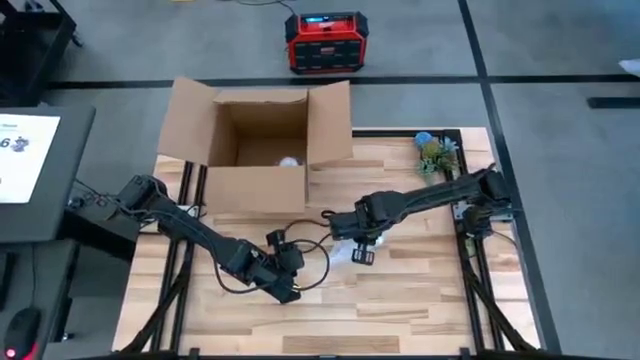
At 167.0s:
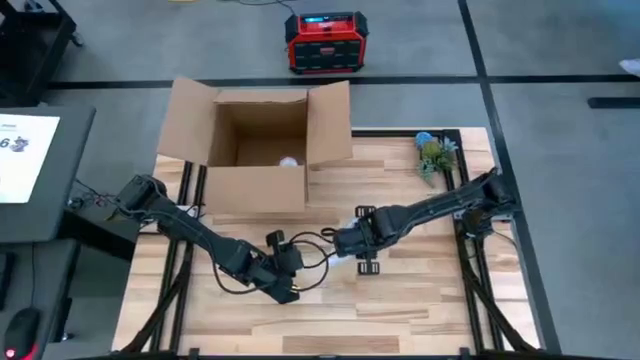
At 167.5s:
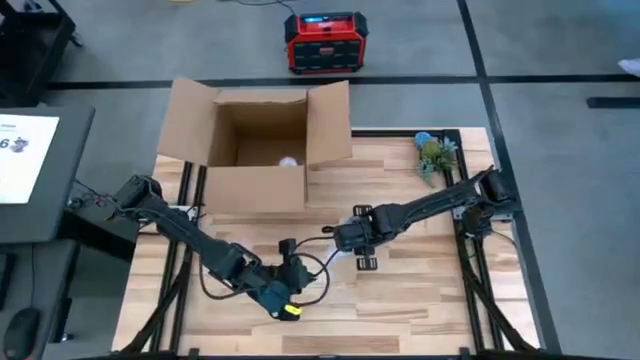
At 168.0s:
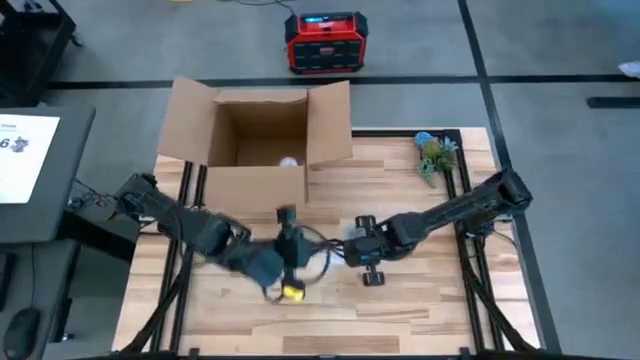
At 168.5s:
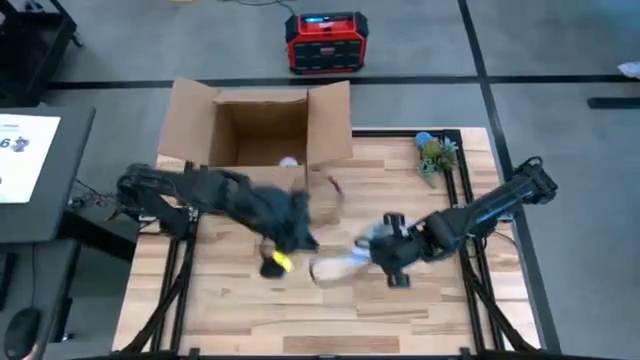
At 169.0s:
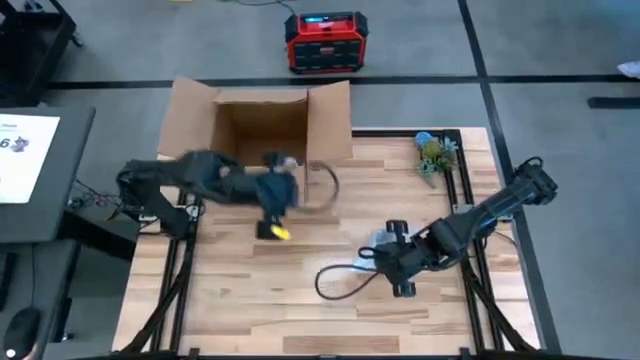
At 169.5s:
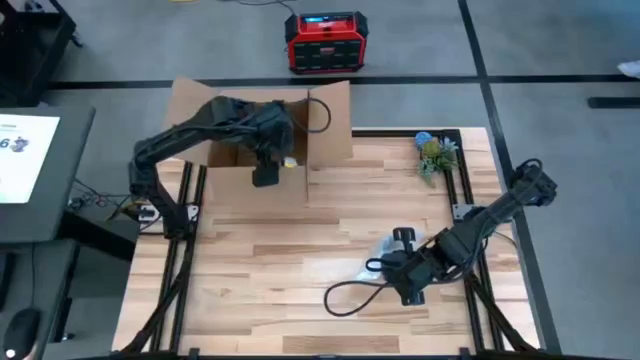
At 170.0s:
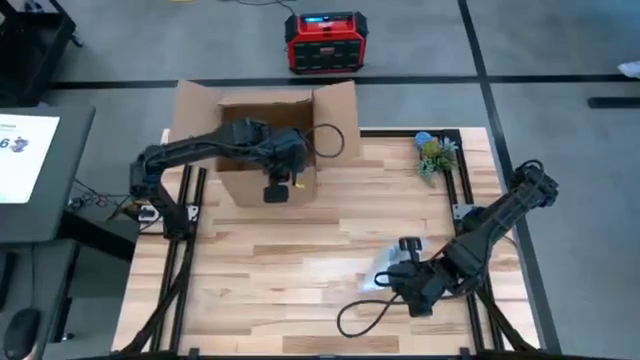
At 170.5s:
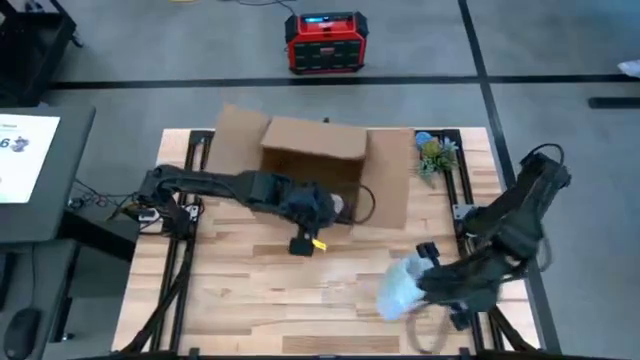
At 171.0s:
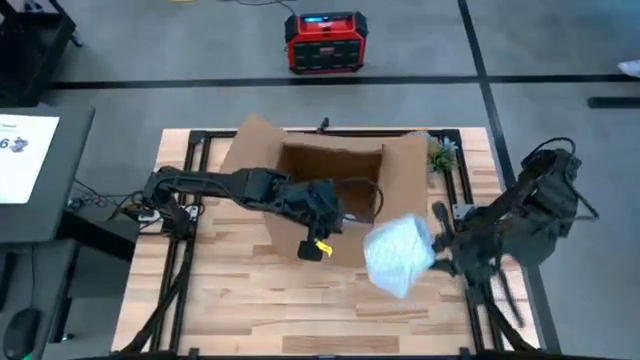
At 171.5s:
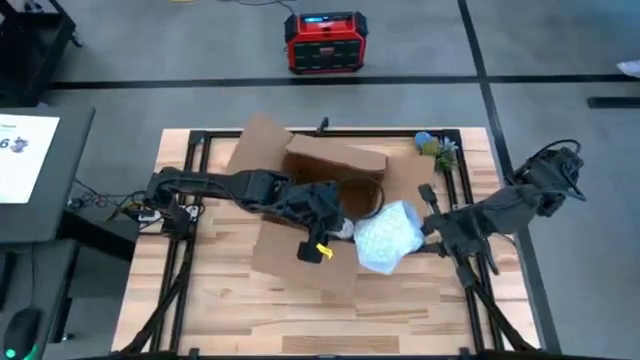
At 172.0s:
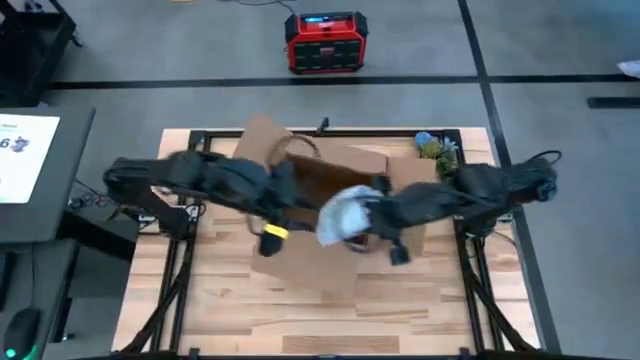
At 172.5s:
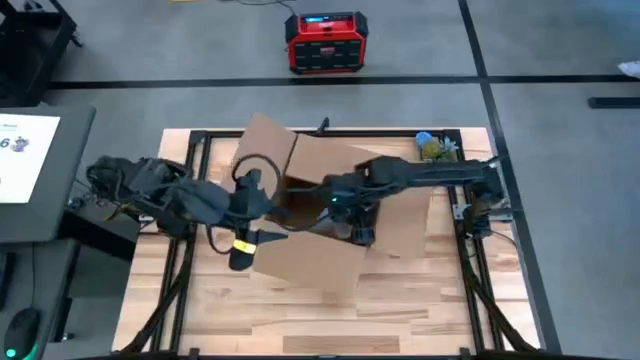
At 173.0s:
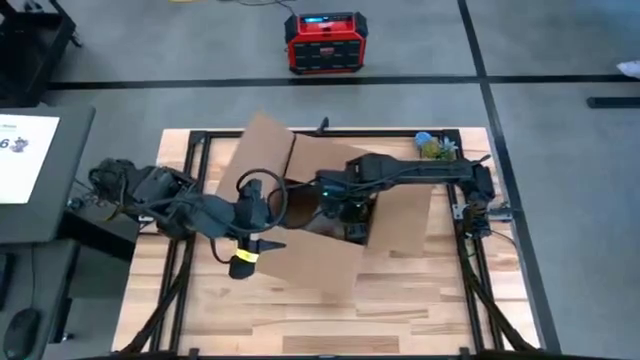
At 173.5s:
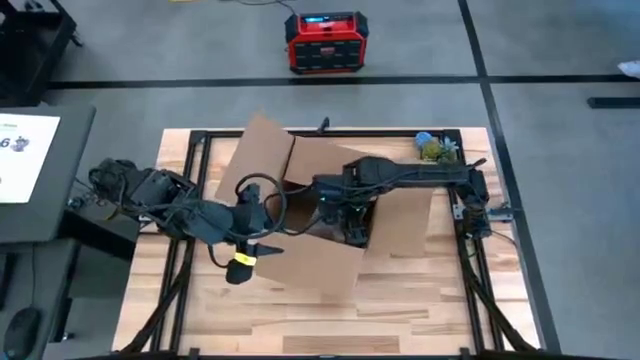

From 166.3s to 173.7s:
Task: wrap mug
Put the wrapped green mug into the cardboard box

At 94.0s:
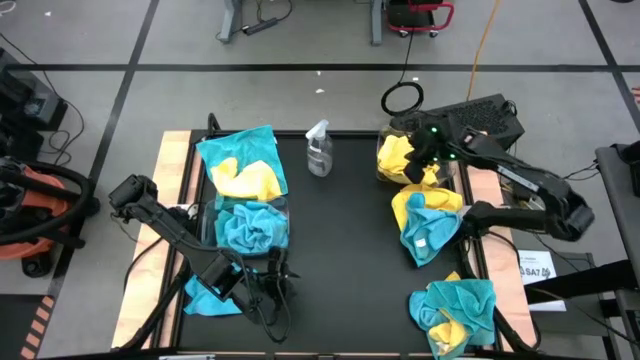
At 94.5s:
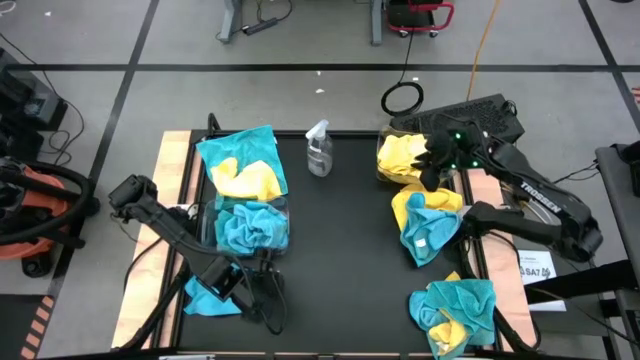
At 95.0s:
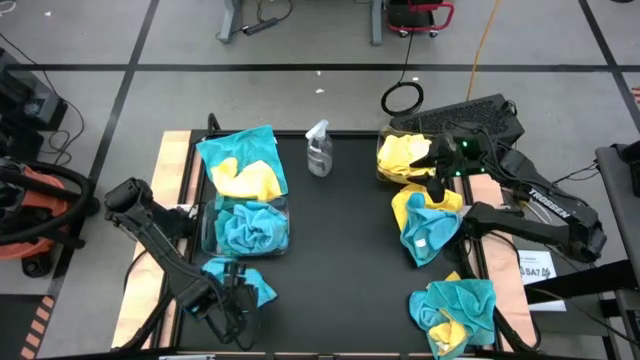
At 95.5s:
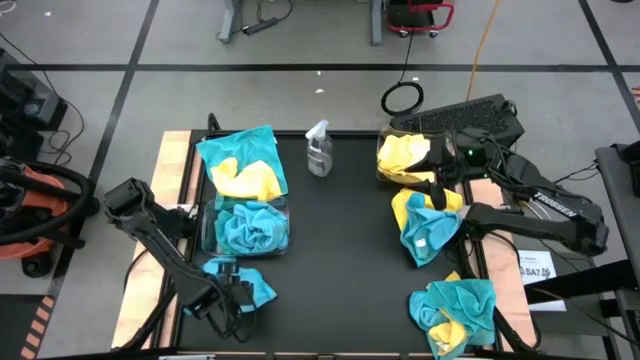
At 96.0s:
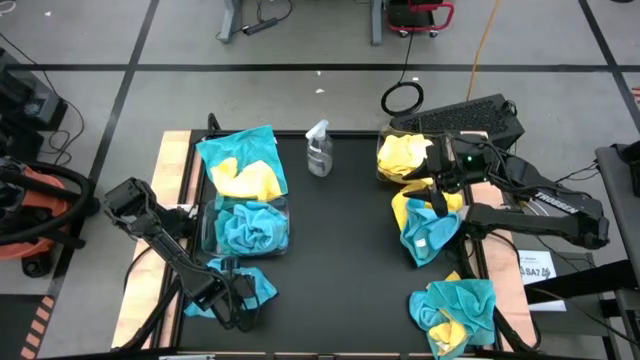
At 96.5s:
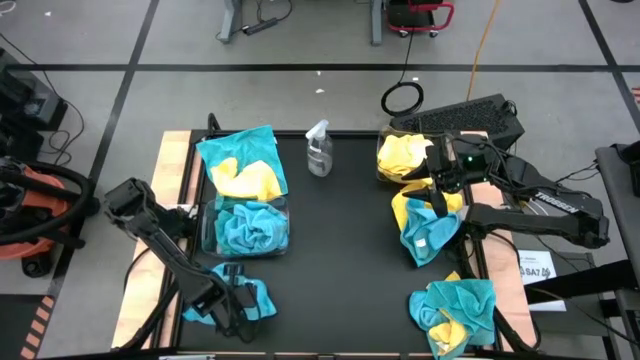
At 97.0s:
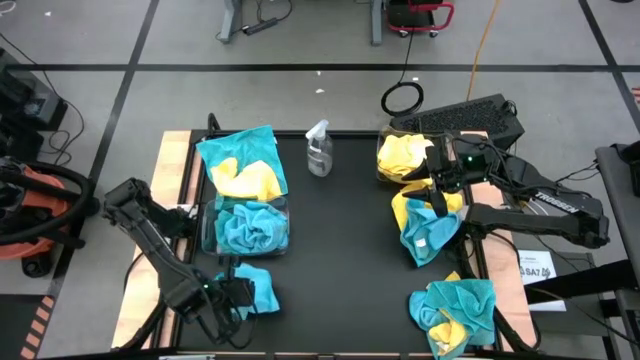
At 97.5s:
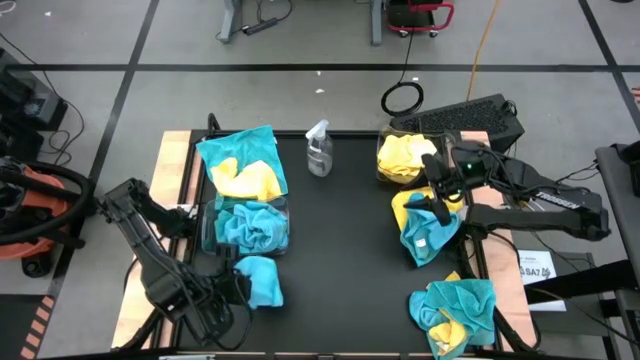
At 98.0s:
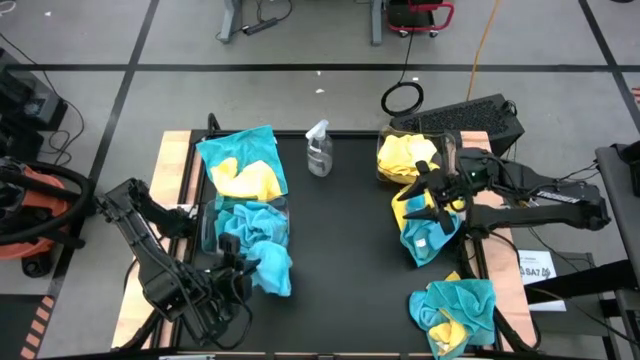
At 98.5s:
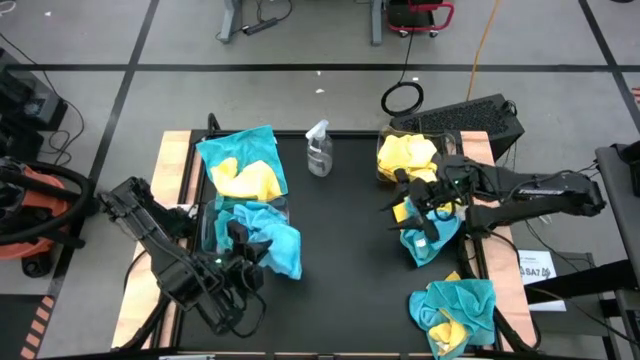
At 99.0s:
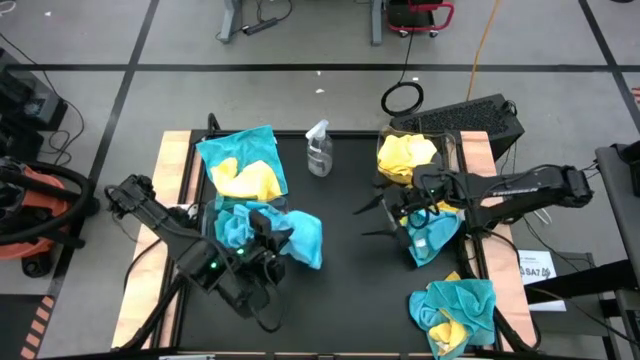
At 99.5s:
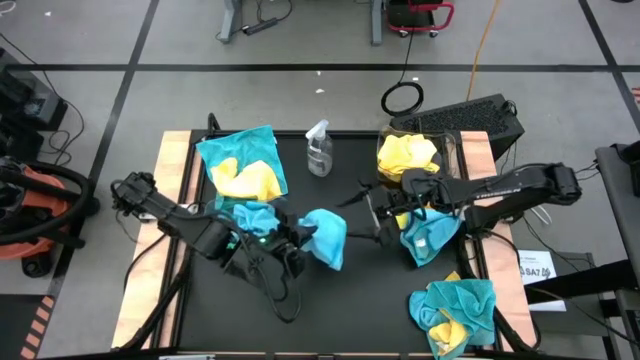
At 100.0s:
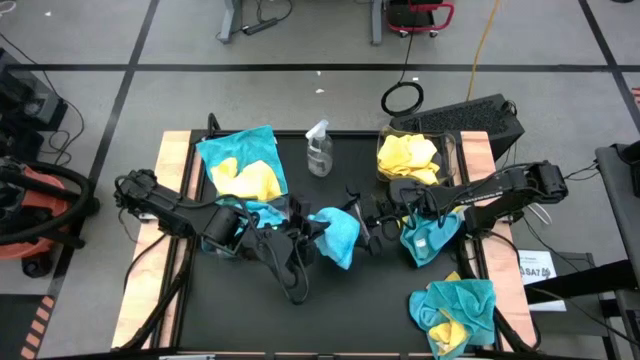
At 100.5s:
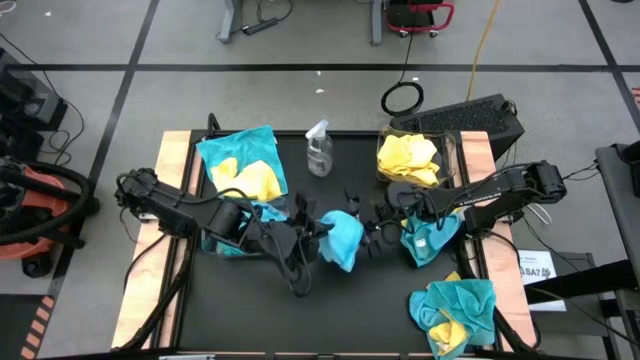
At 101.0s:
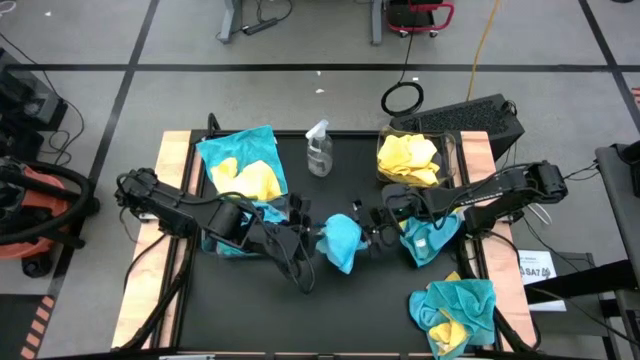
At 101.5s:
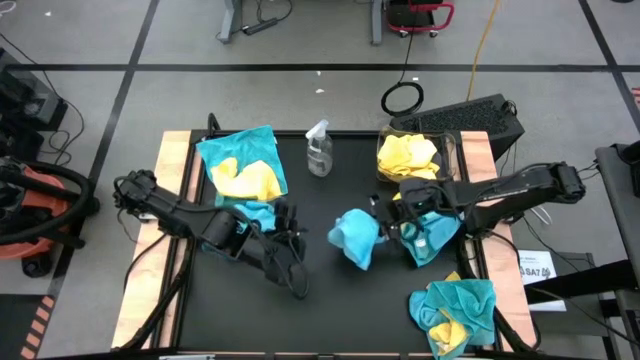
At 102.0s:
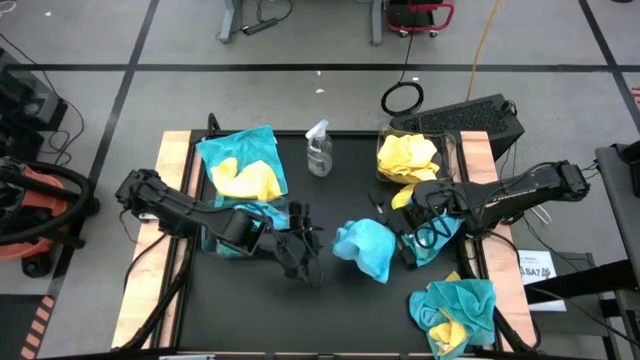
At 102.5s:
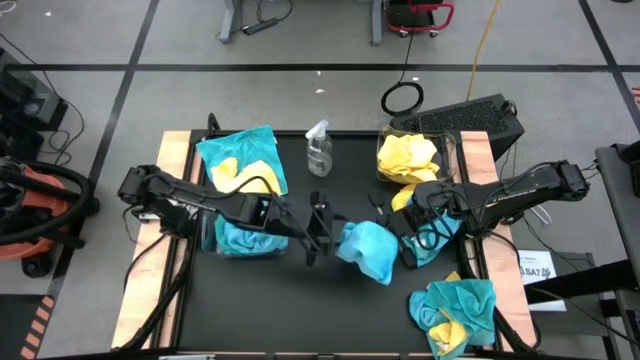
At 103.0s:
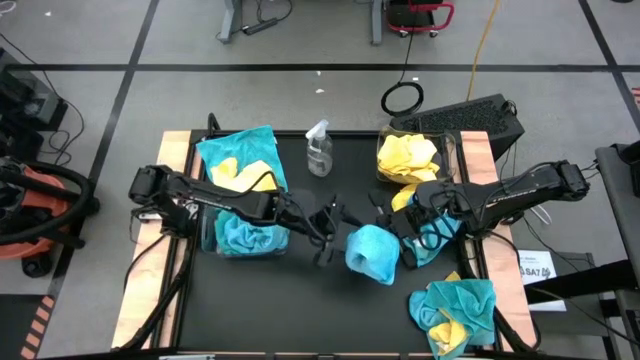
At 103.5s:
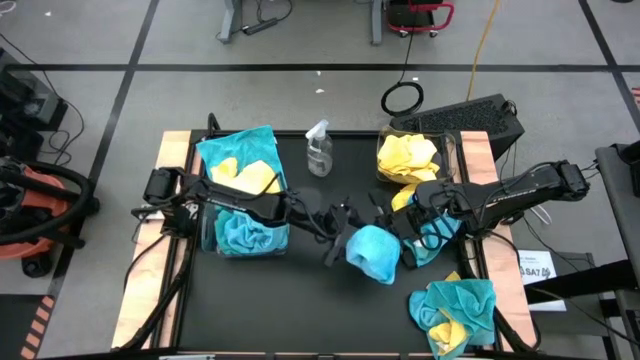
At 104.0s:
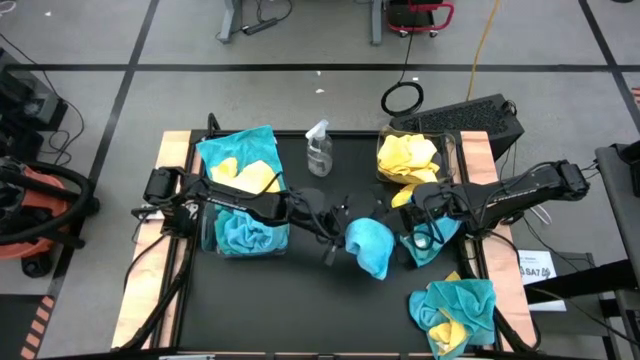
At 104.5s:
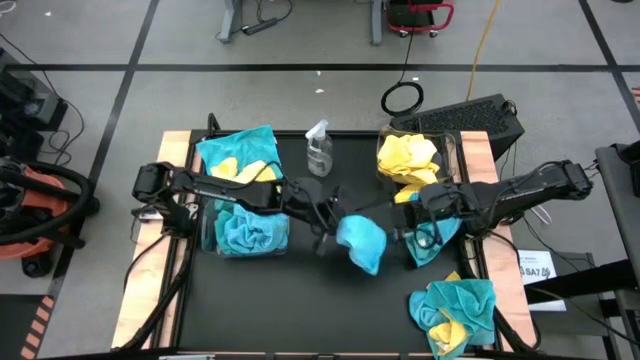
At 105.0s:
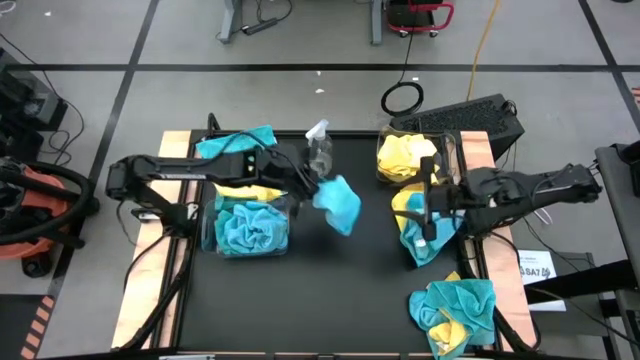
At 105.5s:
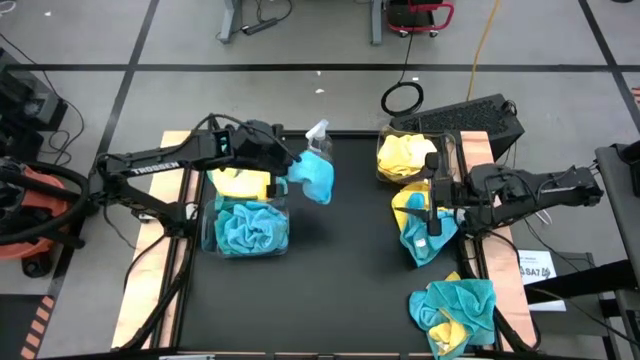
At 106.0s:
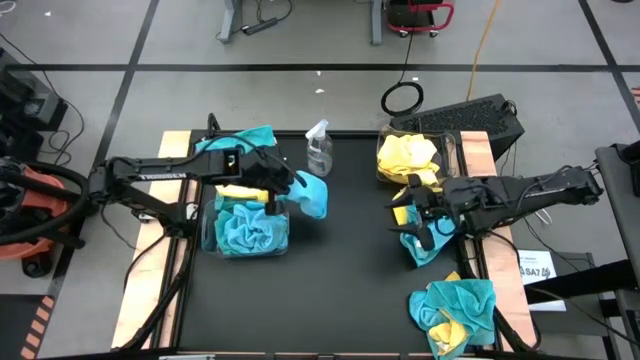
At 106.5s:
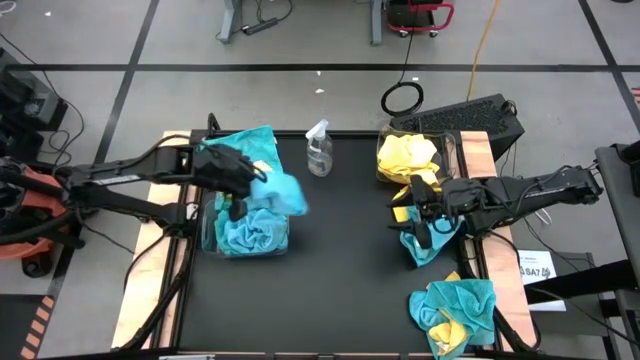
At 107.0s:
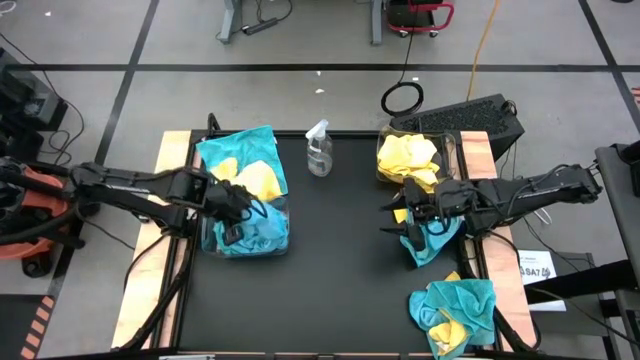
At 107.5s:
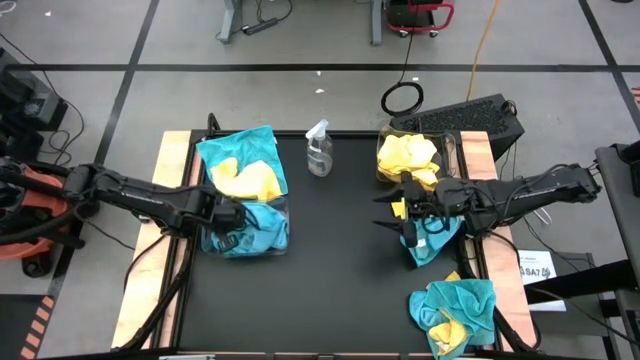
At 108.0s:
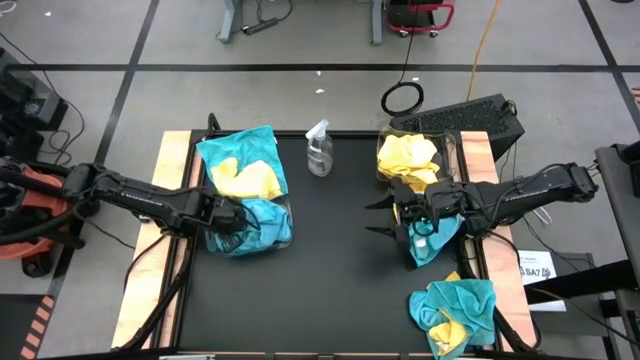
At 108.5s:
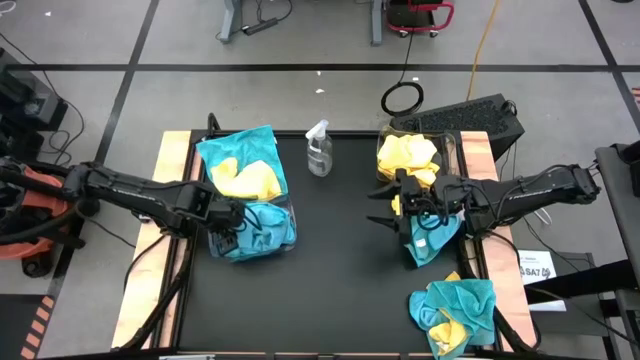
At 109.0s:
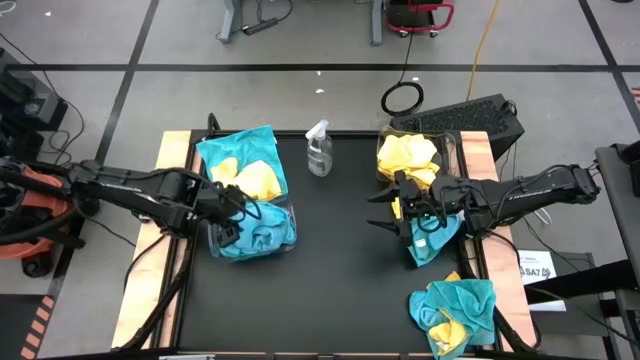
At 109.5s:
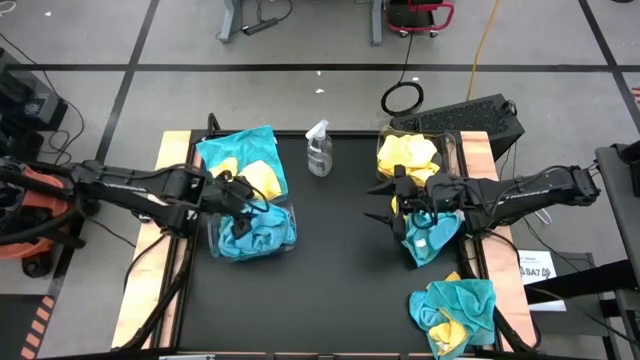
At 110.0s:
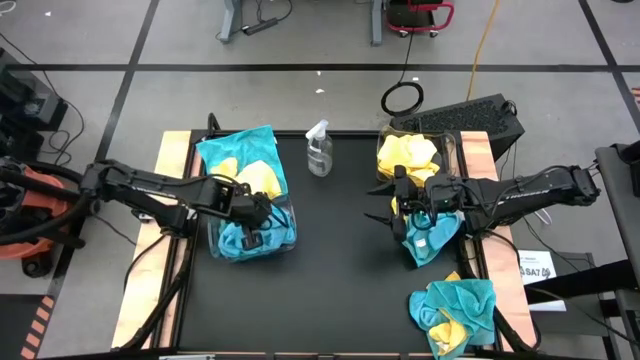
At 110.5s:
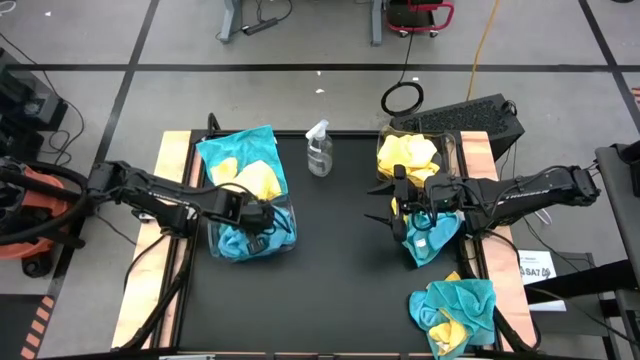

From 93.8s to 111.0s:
Task: Sort microfiber towel by color & place in baskets
Put the blue towel into the bottom transparent bin
